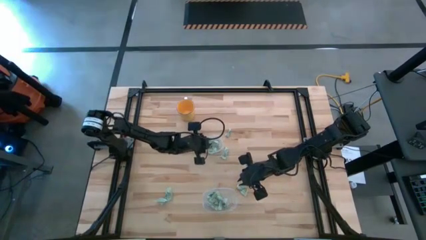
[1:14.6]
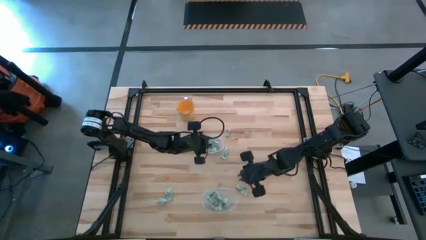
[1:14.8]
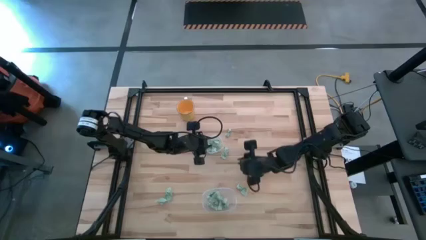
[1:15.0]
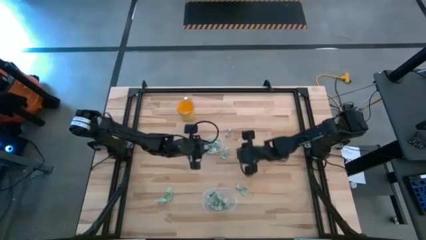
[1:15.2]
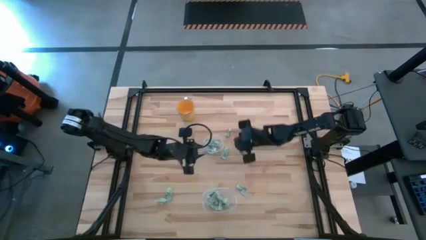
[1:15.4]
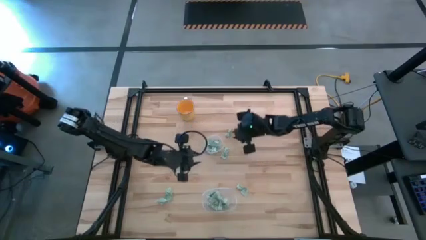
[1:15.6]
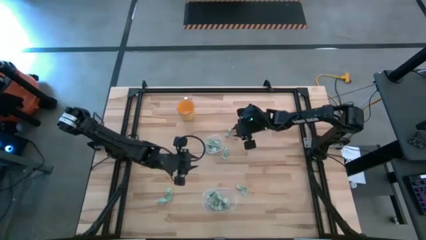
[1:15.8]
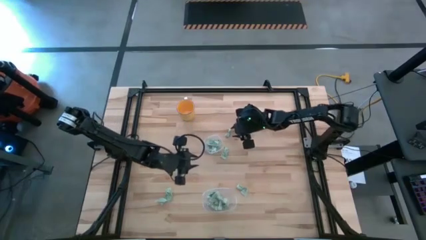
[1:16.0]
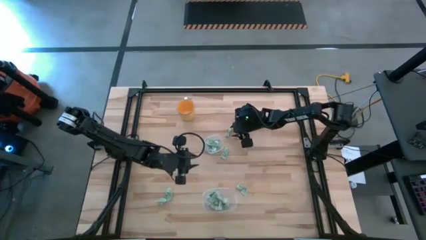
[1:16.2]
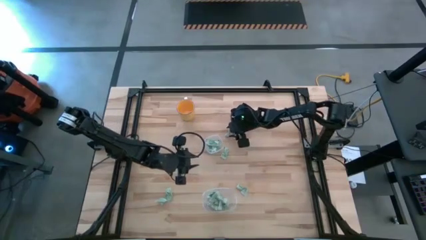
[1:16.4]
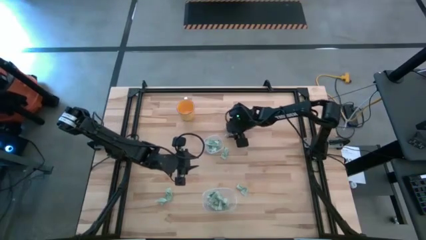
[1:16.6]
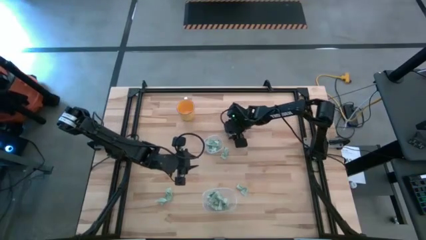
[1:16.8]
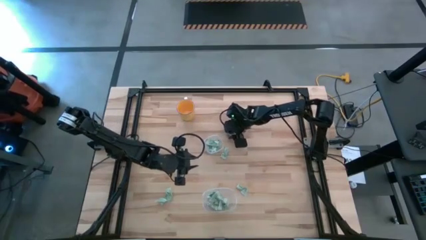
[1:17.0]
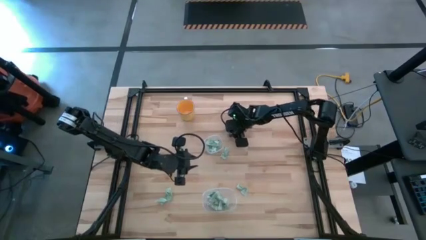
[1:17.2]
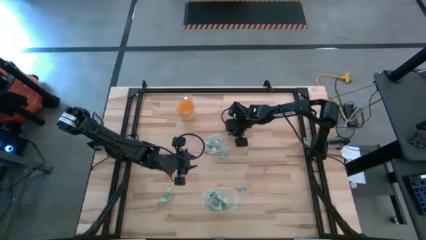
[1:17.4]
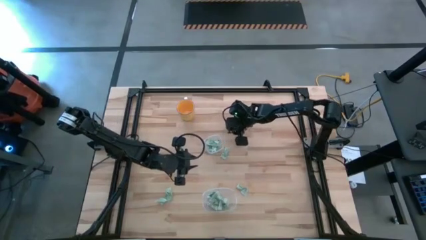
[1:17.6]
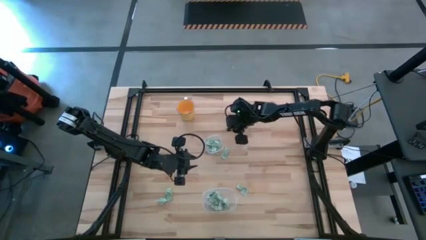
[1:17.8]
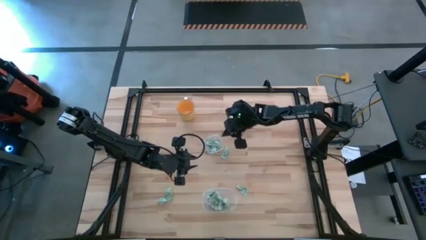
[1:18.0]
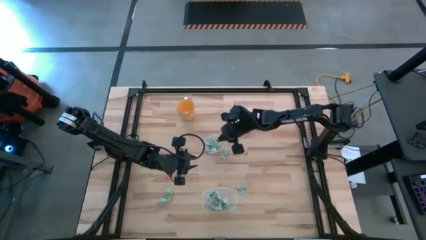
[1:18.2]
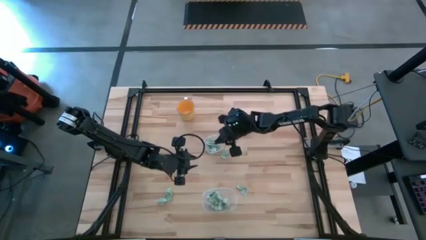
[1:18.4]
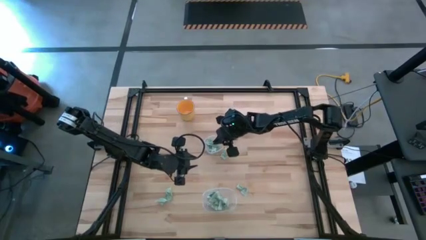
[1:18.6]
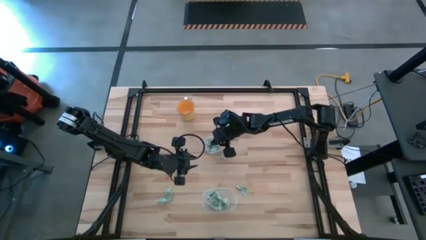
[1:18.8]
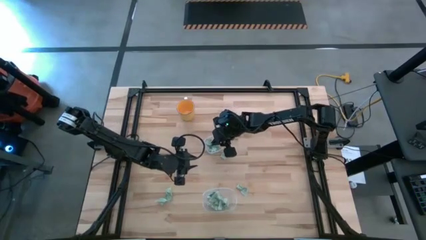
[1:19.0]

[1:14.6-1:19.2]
Put the white stevia packet into the top transparent bin

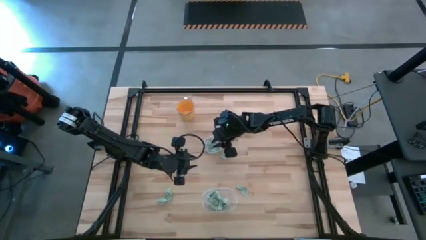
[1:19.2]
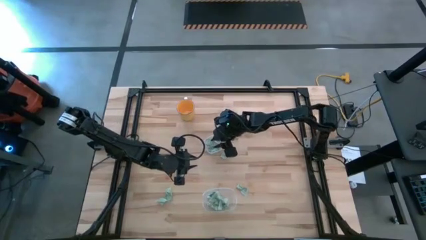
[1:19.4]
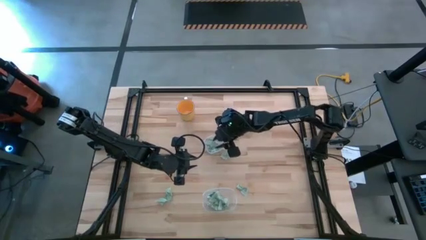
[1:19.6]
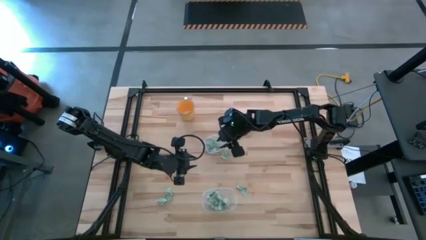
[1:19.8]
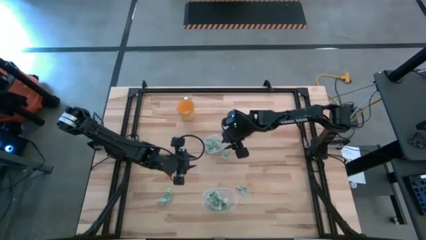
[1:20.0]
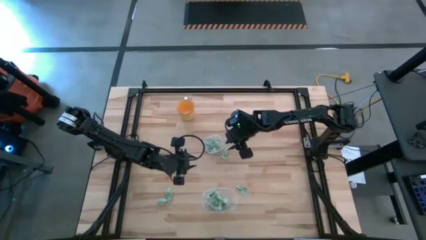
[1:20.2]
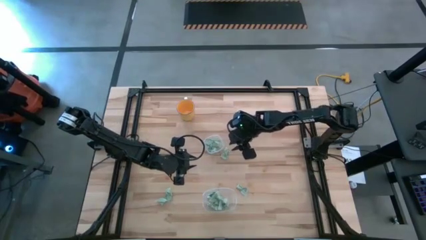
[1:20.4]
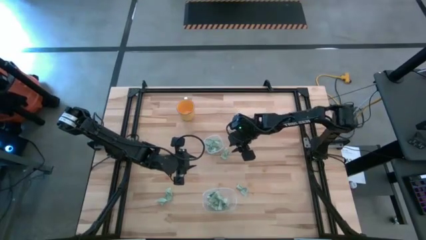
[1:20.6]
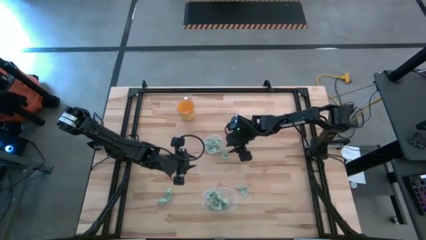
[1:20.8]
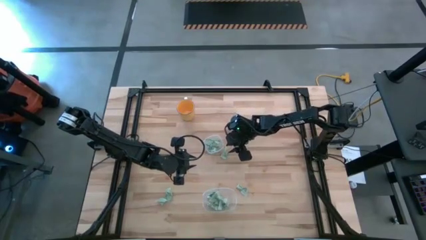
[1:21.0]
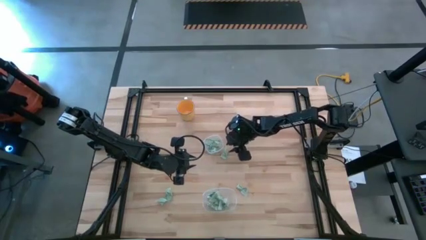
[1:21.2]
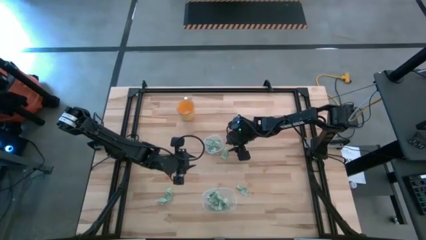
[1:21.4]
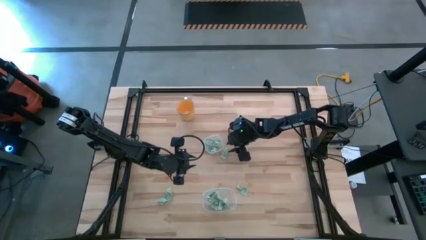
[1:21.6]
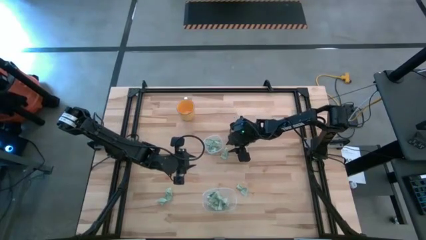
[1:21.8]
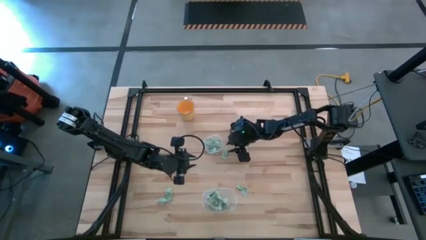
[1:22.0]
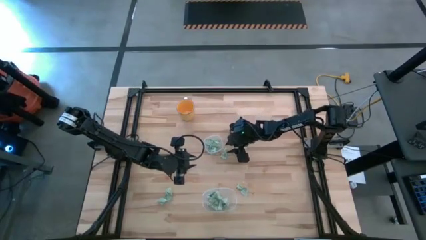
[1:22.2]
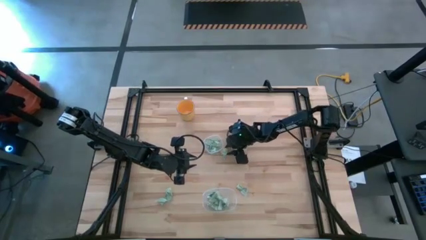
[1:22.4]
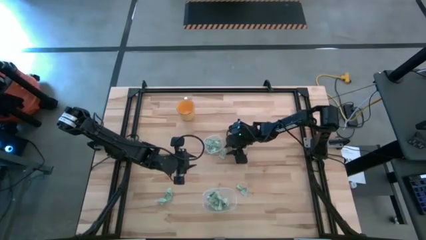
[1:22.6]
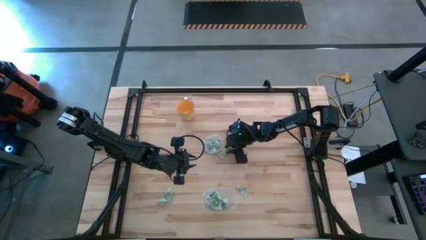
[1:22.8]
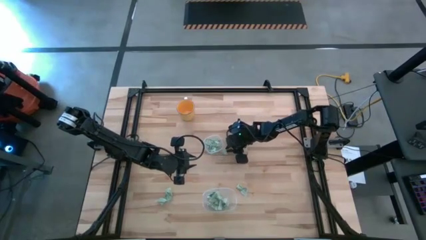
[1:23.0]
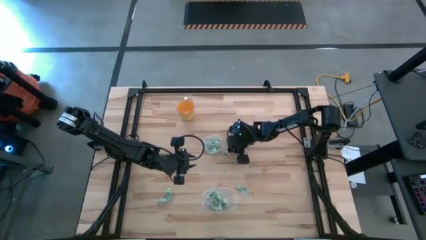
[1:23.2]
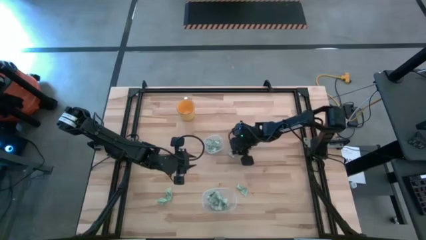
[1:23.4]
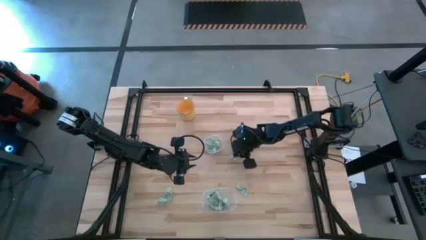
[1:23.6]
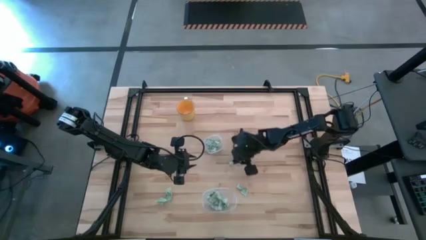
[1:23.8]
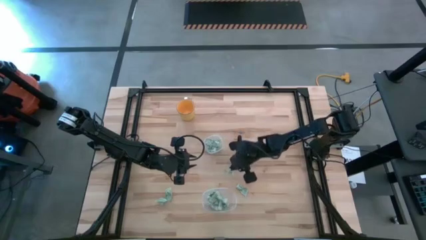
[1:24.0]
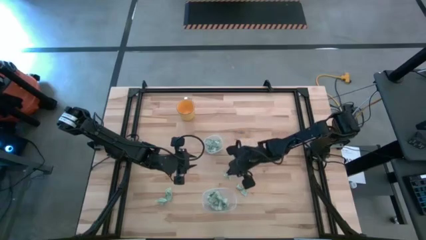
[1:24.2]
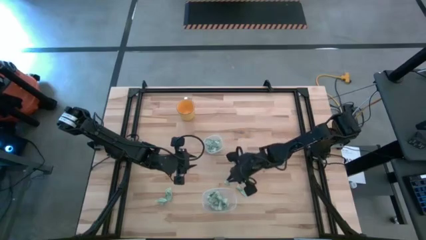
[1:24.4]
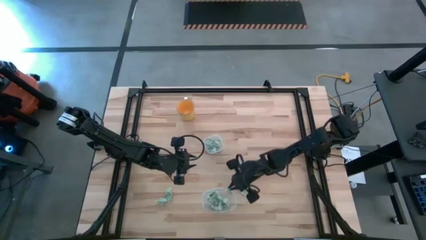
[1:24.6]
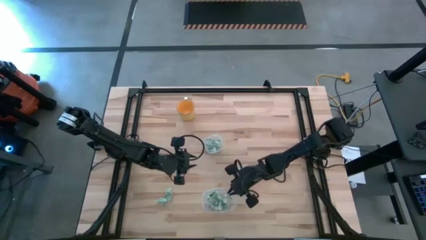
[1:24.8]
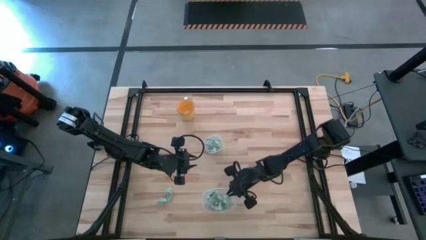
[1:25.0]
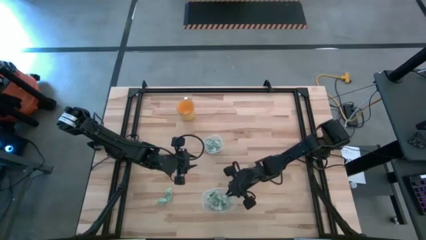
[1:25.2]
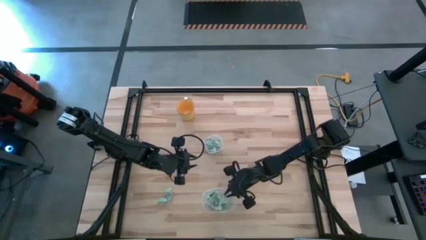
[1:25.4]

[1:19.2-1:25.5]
Put the white stevia packet into the bottom transparent bin

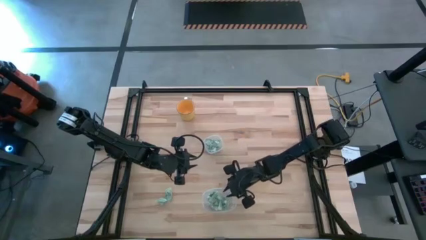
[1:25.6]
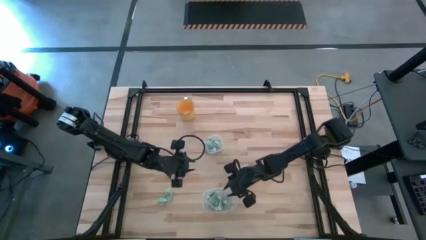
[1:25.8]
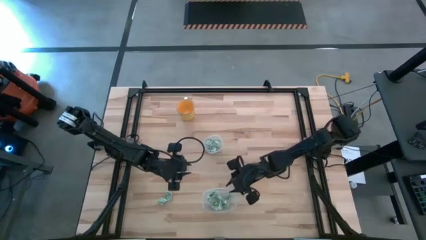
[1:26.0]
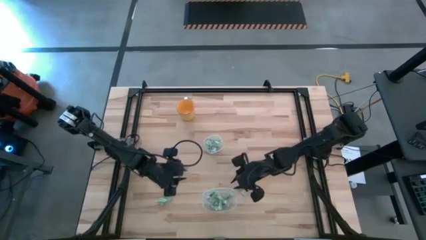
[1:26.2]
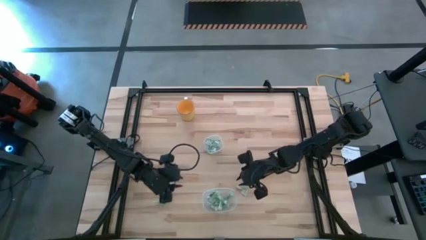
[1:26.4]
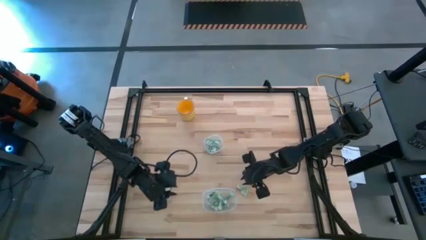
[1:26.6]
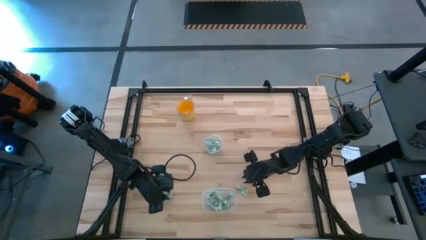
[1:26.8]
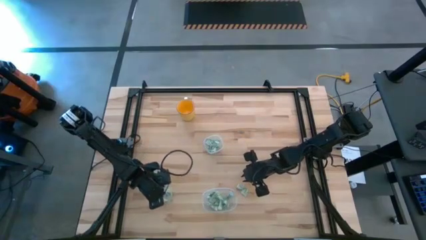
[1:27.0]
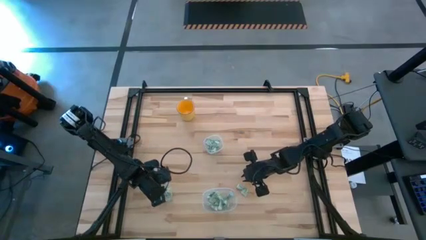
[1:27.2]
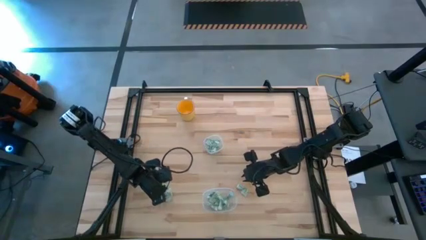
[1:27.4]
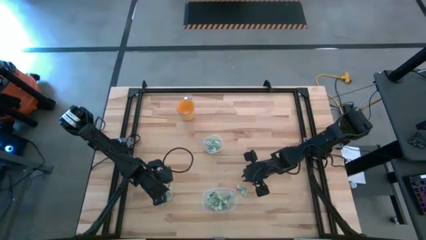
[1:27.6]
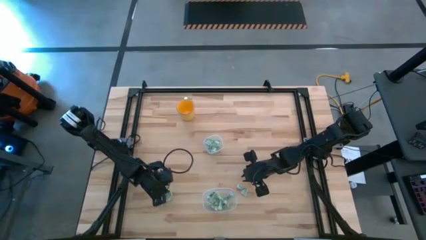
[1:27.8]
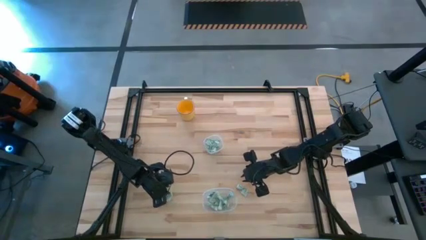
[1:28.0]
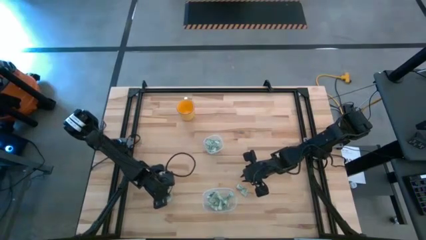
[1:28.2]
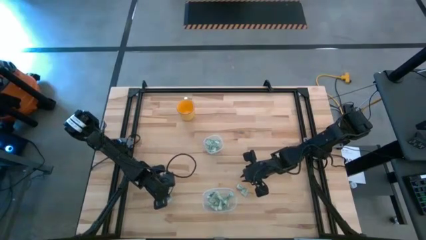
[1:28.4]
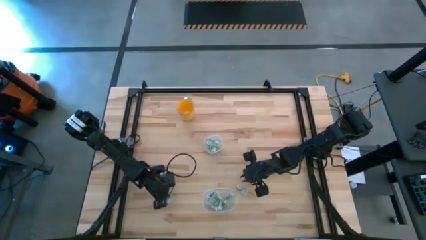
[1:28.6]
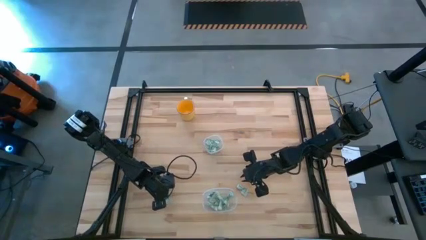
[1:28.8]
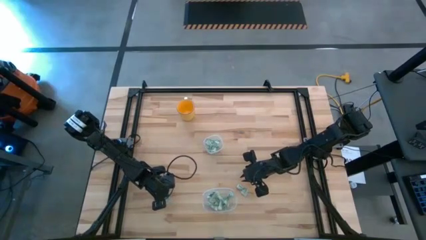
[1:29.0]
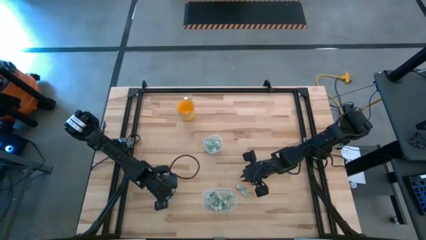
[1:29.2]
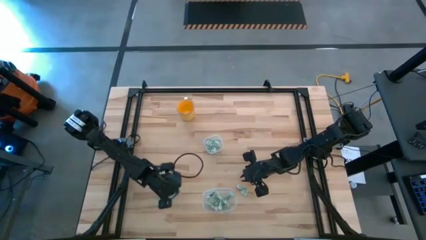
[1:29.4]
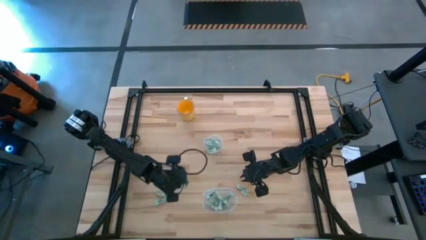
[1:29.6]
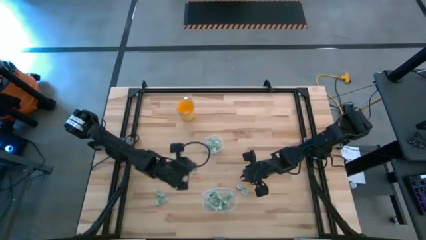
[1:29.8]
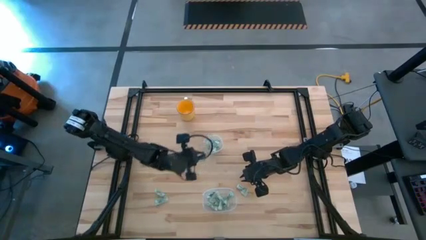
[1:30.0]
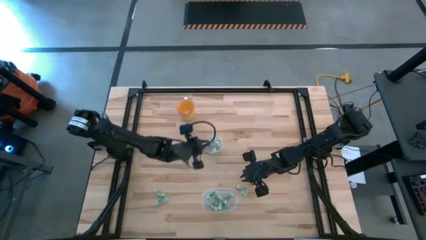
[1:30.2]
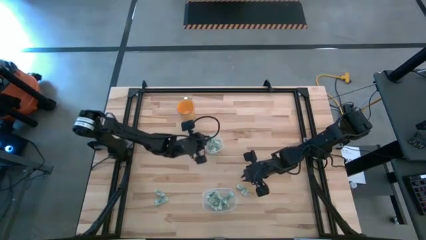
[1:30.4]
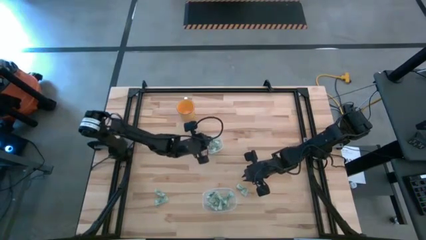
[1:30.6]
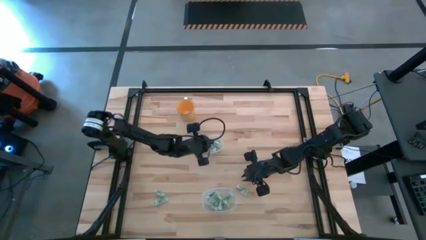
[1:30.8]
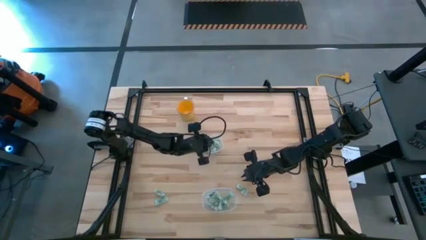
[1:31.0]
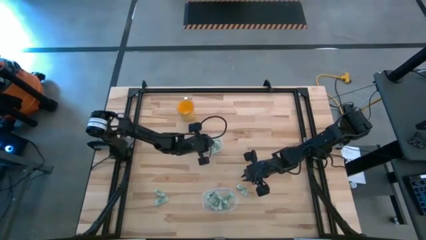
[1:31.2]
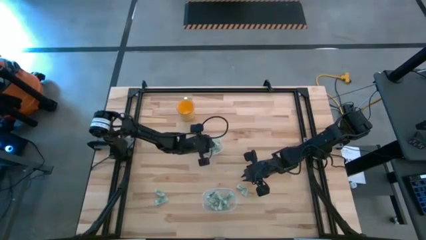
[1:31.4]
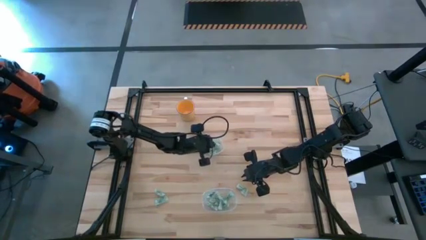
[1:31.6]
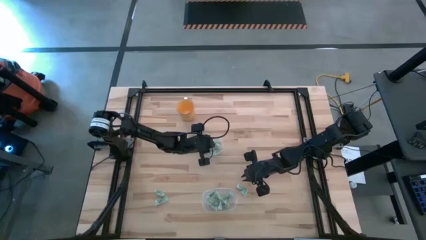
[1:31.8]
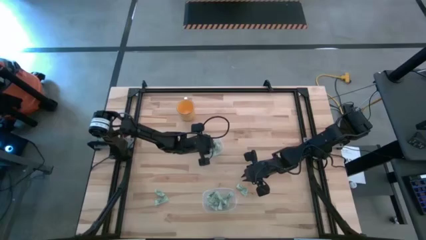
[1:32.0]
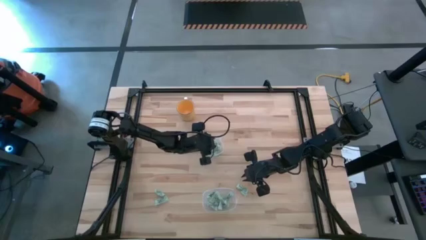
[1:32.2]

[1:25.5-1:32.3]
Put the white stevia packet into the top transparent bin
